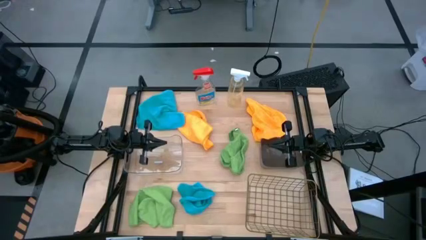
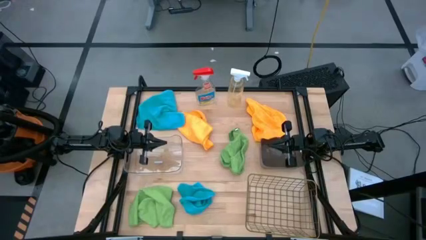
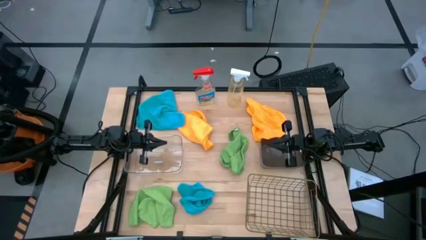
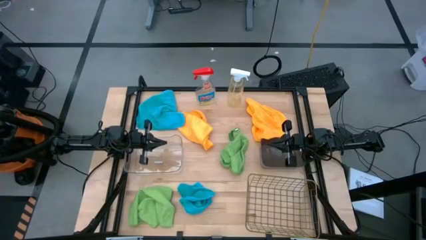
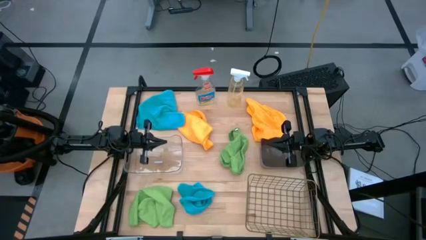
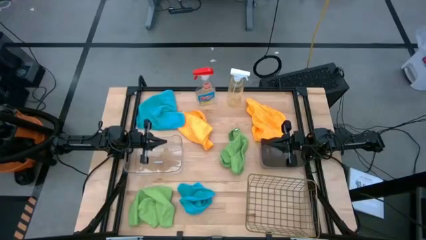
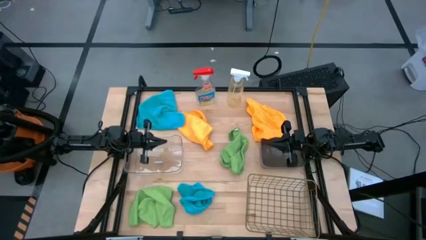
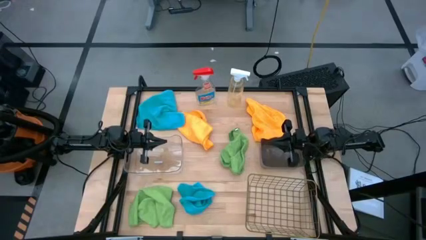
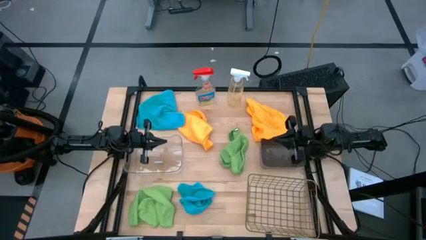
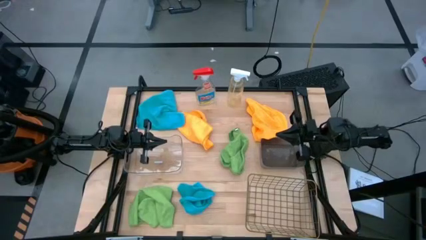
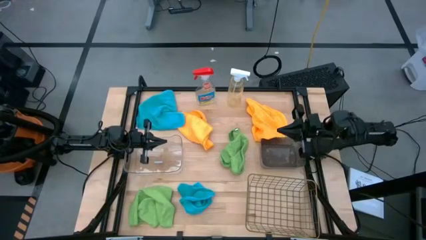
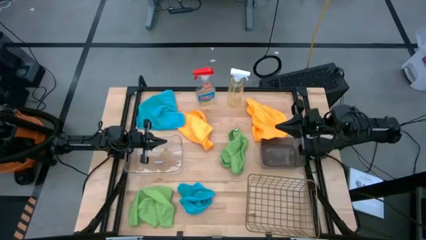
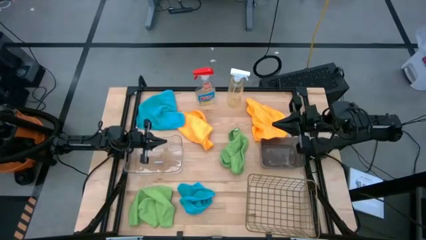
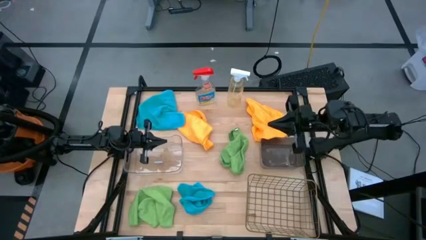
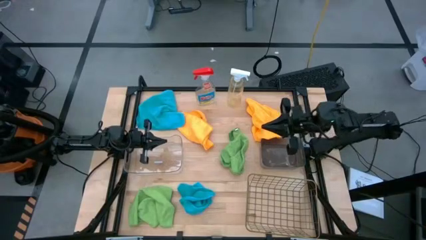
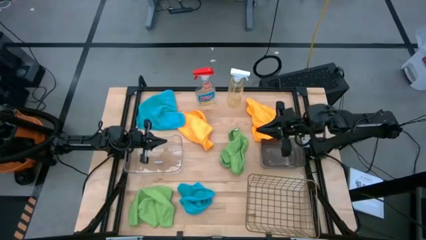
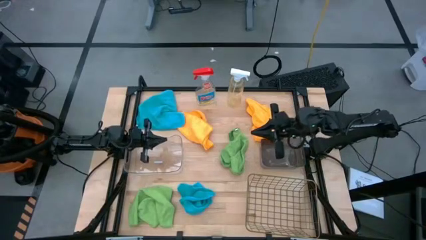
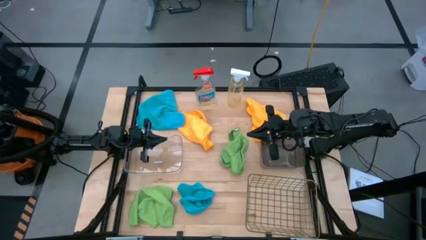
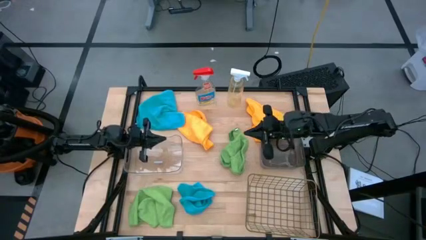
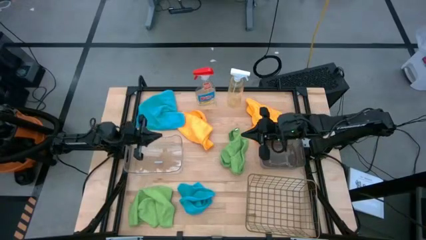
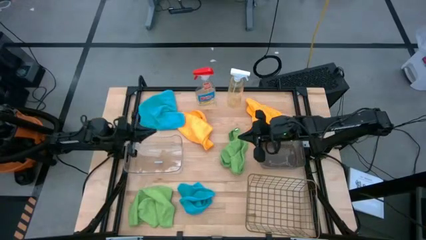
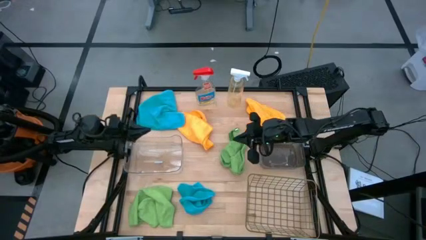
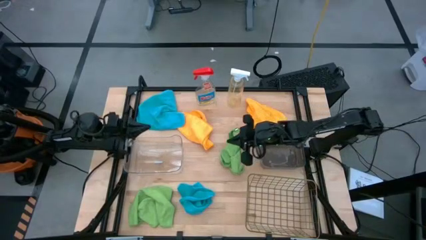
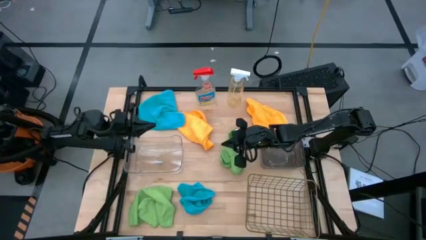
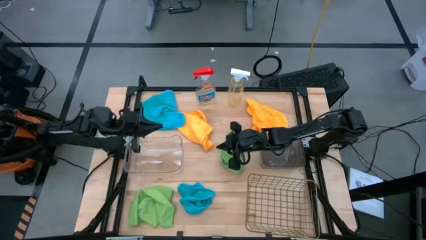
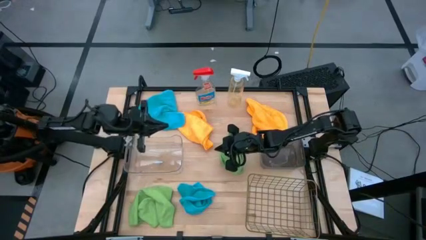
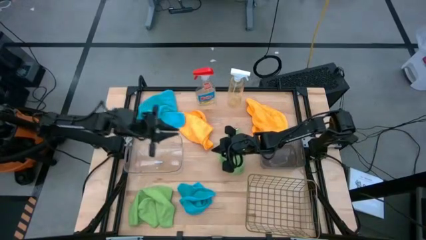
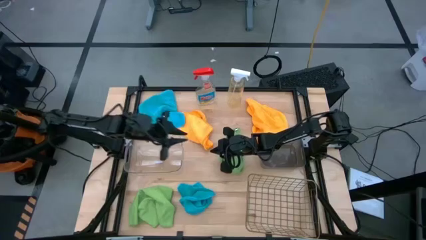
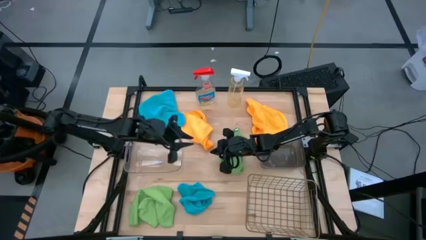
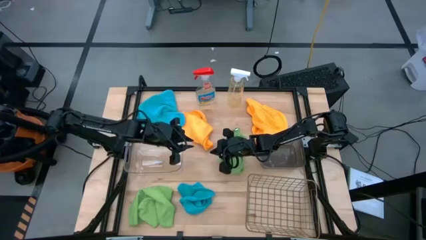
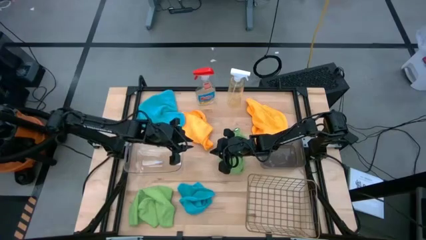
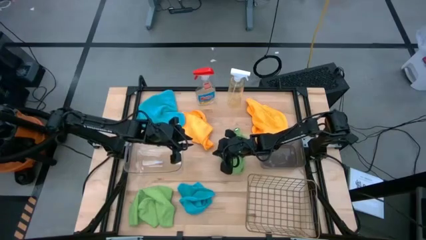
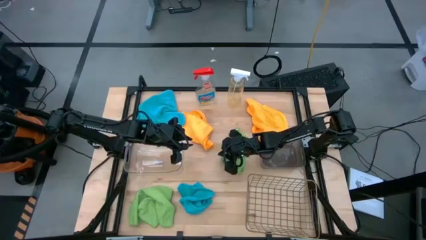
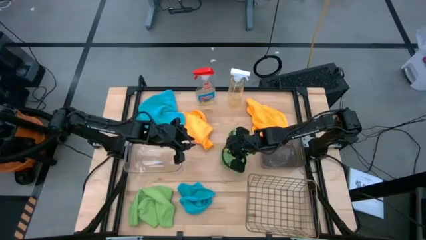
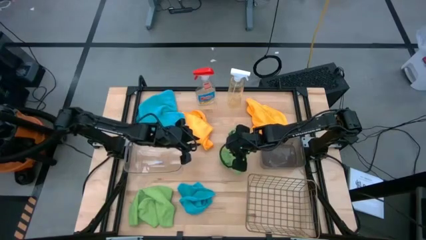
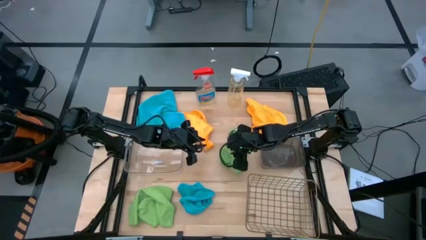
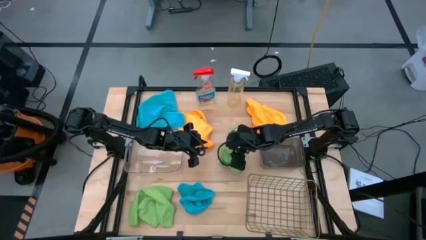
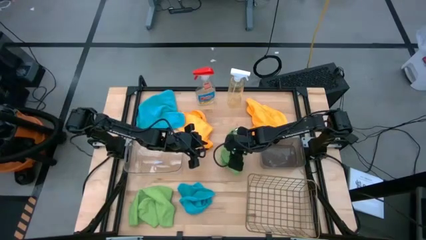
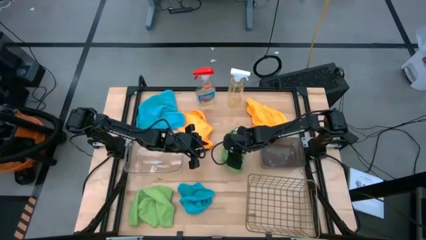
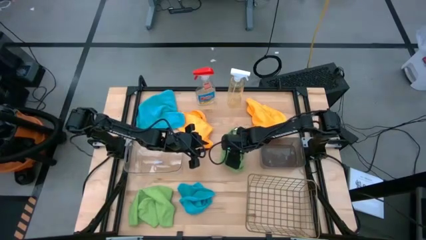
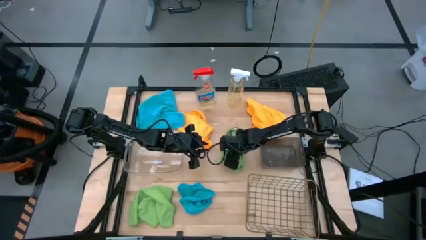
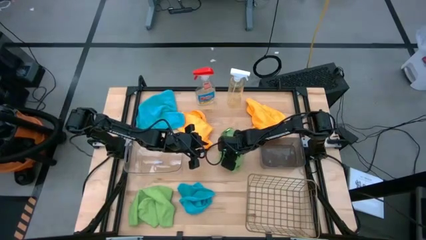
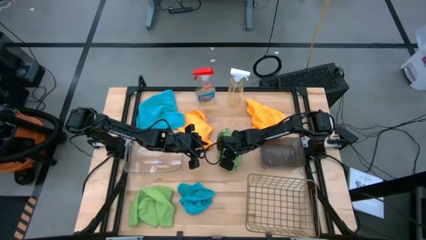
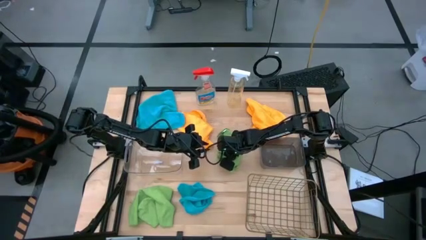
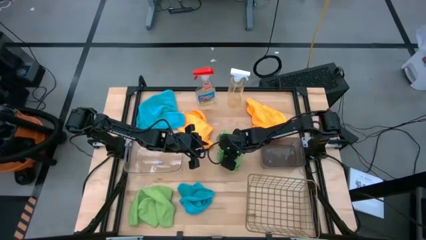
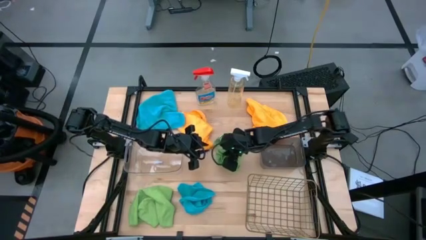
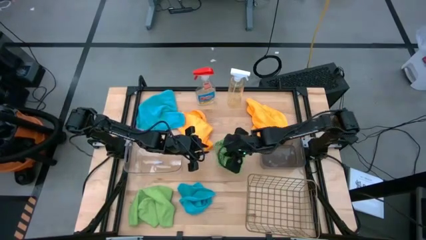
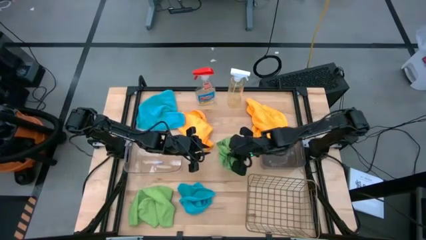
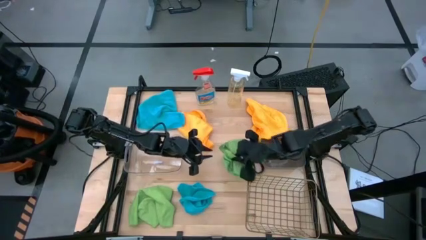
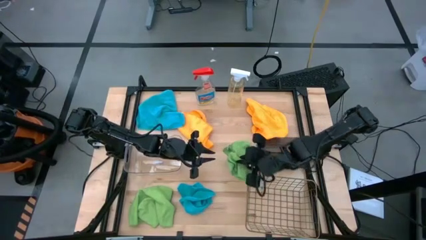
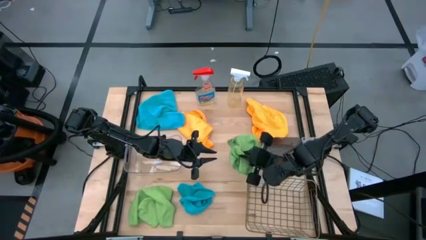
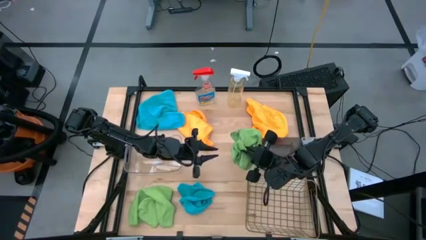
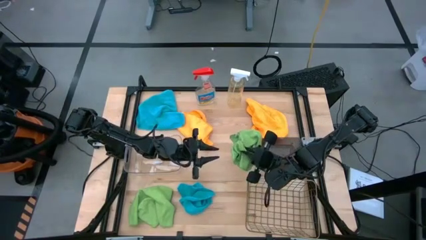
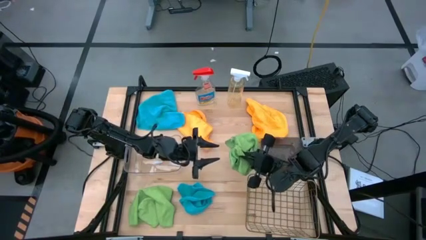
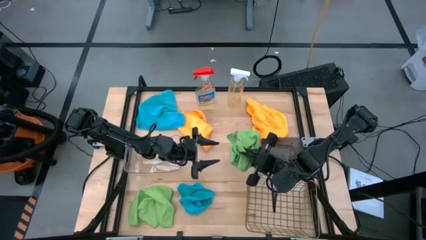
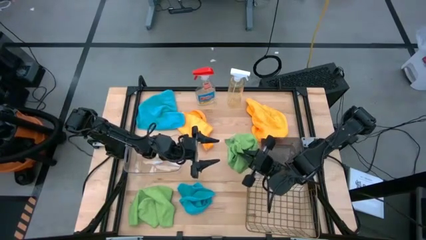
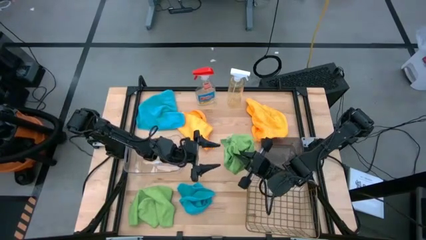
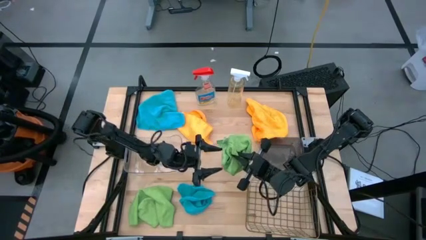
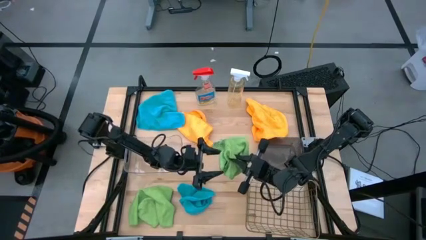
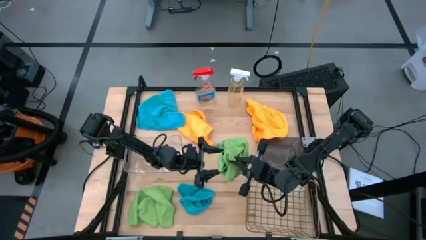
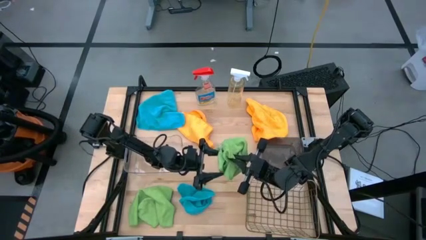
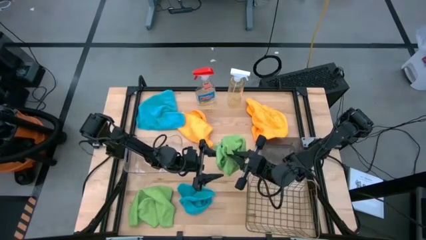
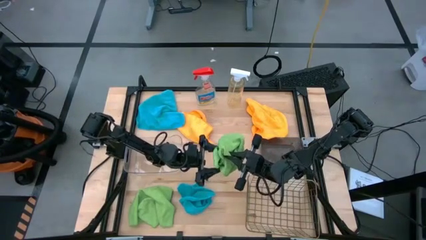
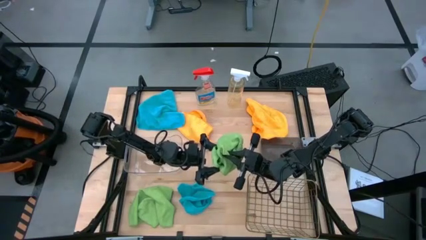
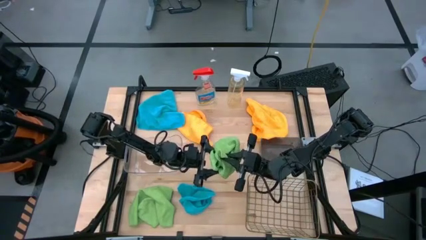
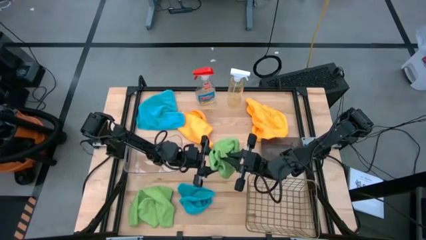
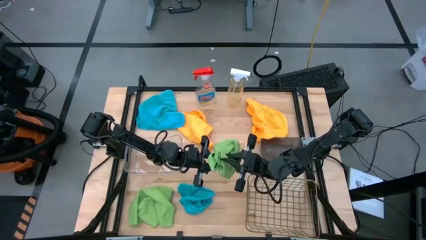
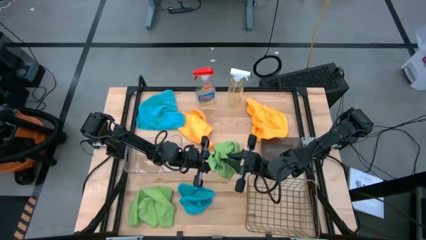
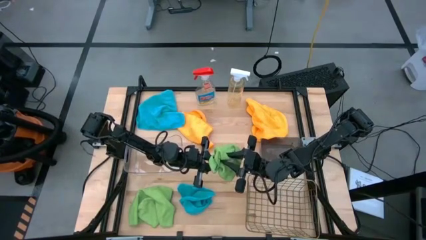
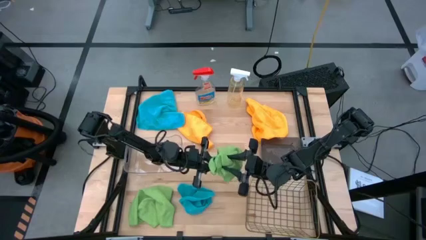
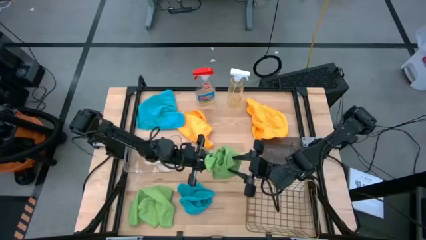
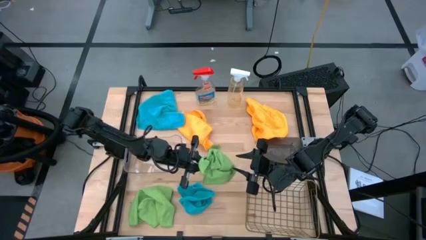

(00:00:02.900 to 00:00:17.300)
Task: Sort microfiber towel by color & place in baskets
Put the right green microfiber cloth into the transparent bin
